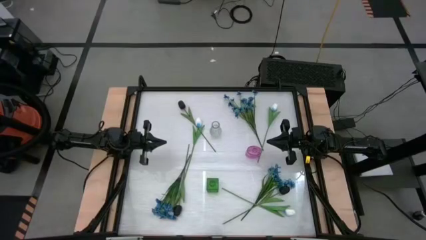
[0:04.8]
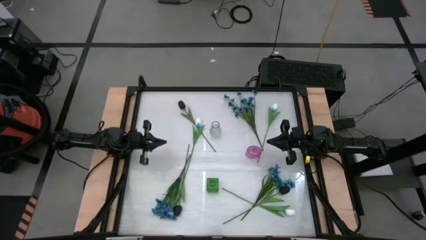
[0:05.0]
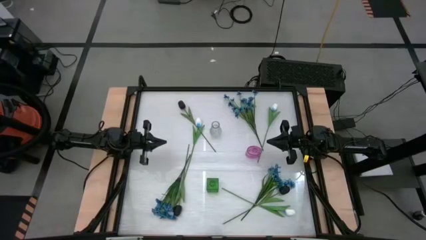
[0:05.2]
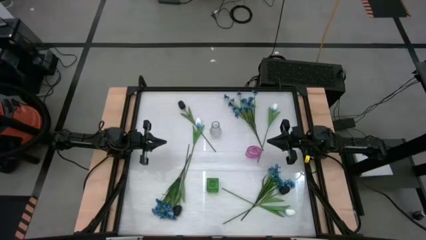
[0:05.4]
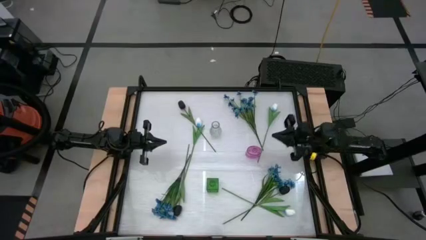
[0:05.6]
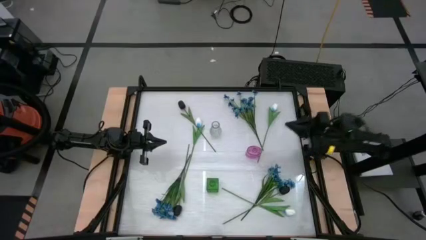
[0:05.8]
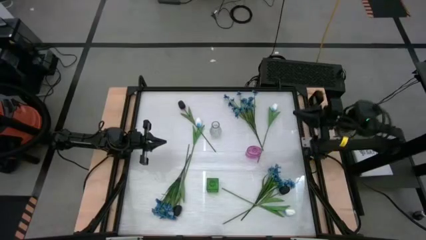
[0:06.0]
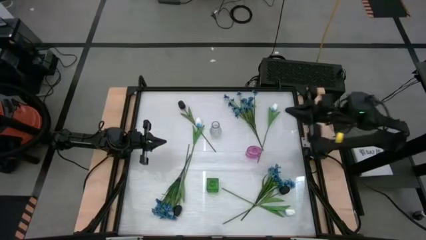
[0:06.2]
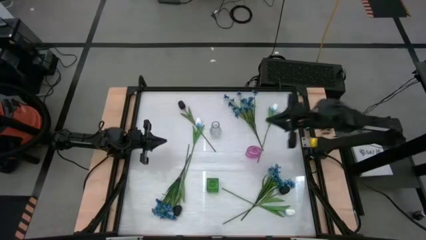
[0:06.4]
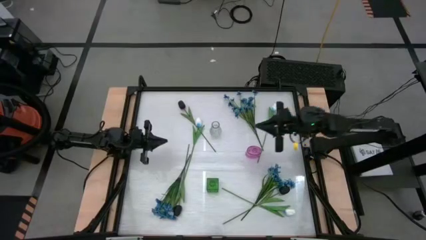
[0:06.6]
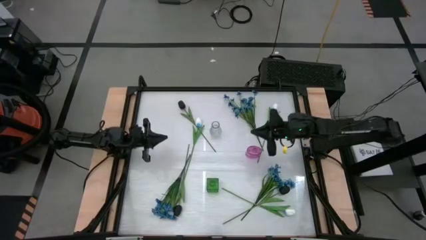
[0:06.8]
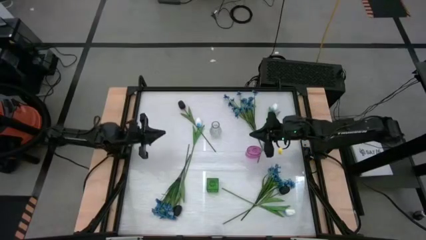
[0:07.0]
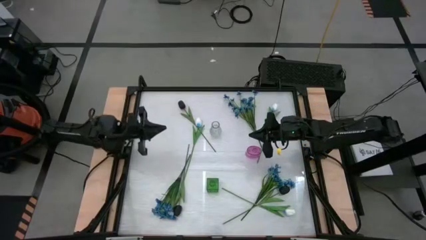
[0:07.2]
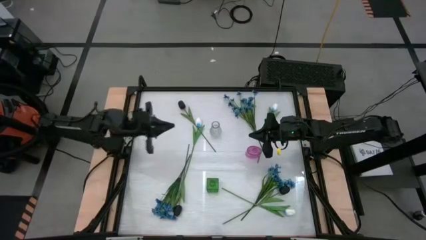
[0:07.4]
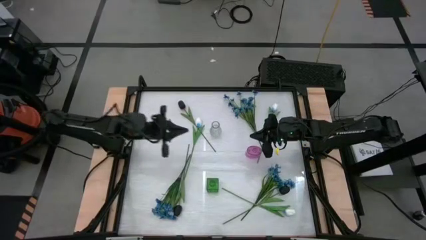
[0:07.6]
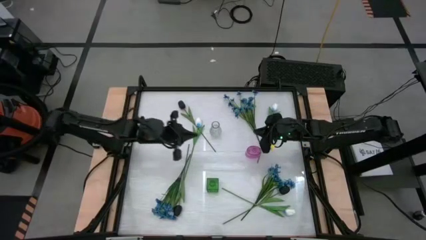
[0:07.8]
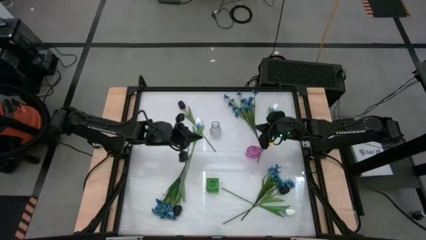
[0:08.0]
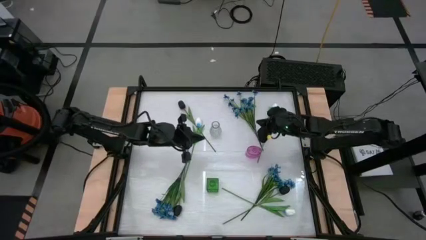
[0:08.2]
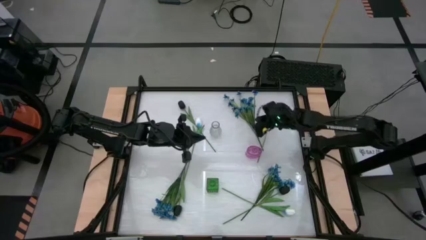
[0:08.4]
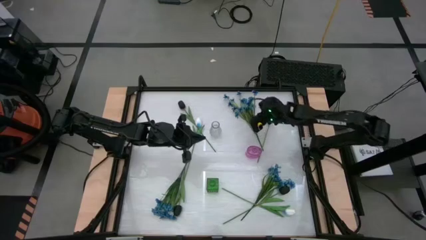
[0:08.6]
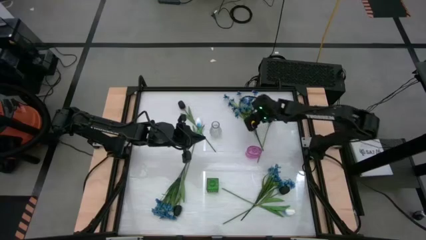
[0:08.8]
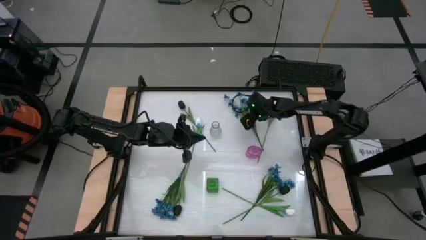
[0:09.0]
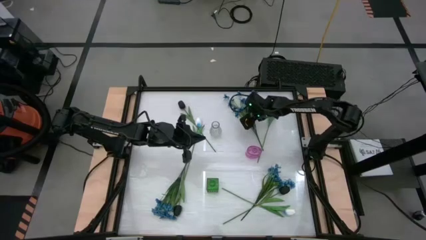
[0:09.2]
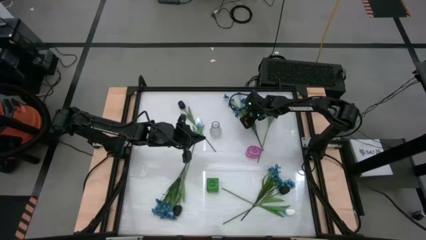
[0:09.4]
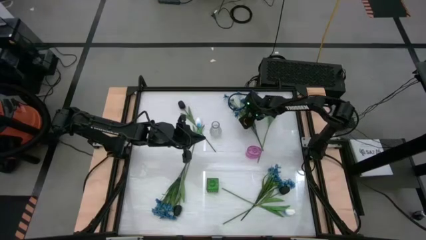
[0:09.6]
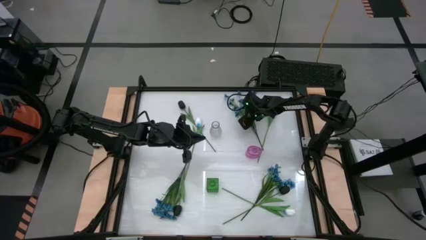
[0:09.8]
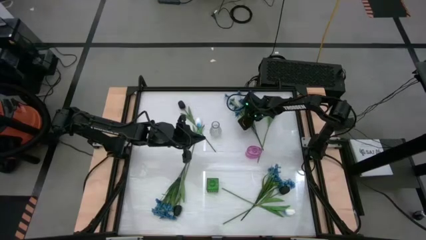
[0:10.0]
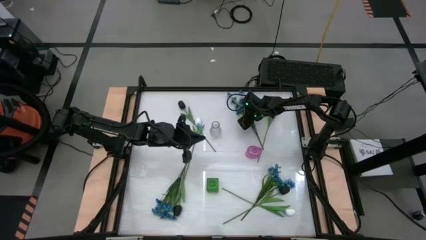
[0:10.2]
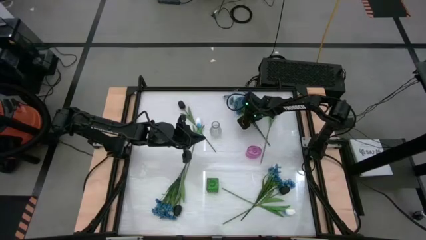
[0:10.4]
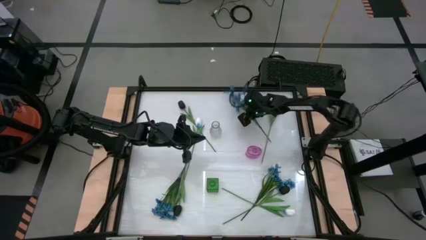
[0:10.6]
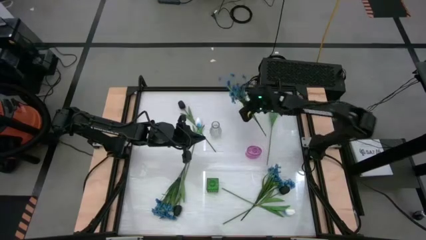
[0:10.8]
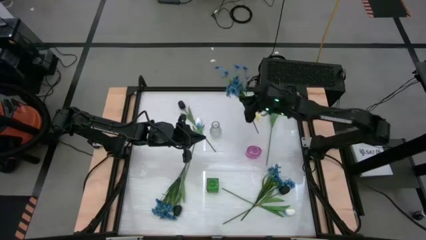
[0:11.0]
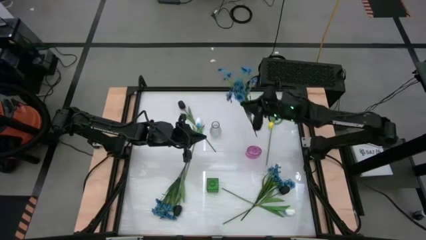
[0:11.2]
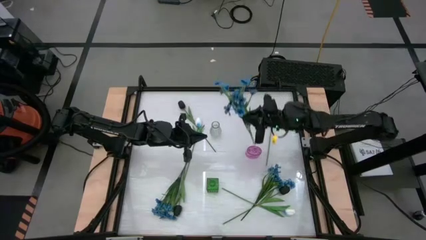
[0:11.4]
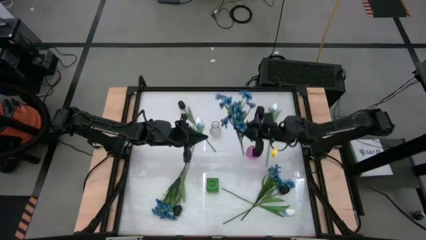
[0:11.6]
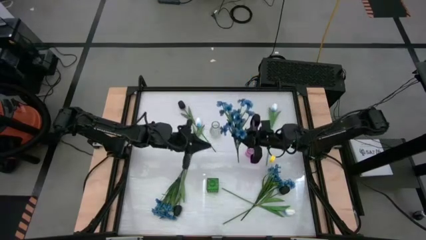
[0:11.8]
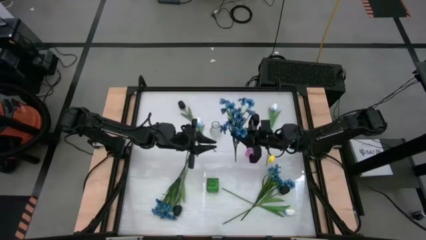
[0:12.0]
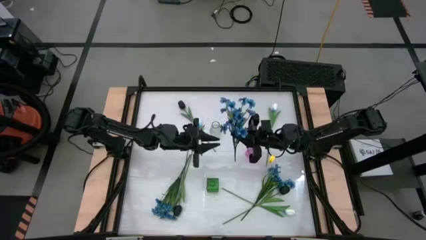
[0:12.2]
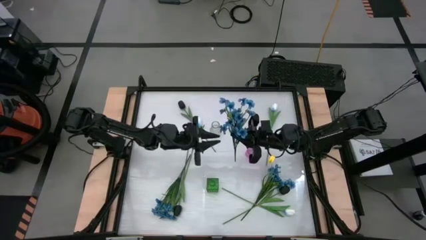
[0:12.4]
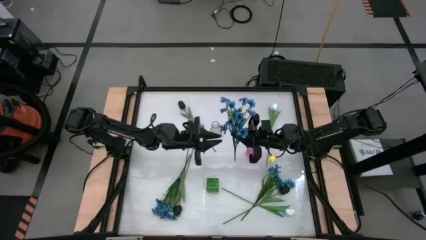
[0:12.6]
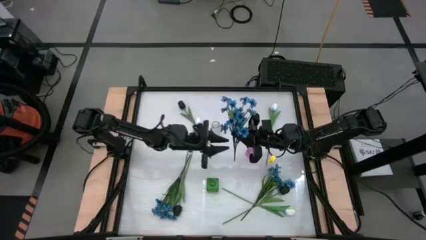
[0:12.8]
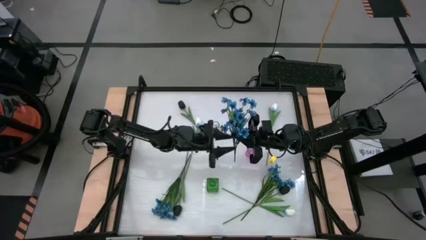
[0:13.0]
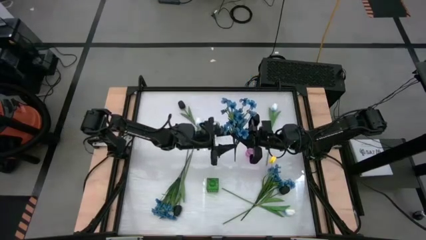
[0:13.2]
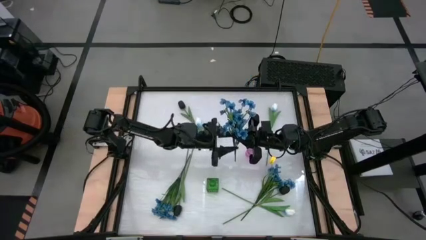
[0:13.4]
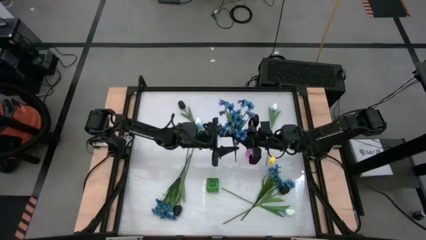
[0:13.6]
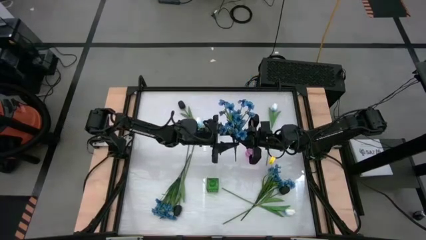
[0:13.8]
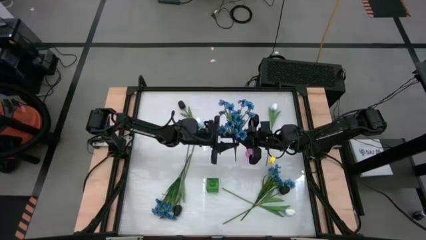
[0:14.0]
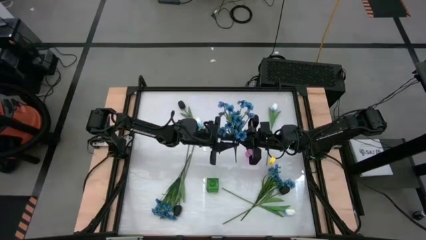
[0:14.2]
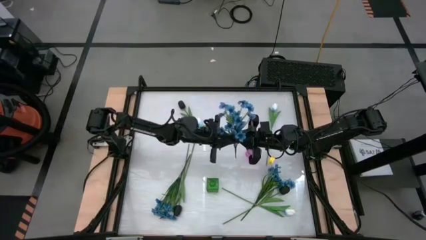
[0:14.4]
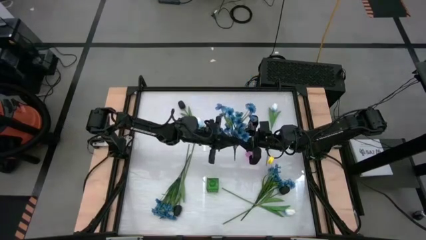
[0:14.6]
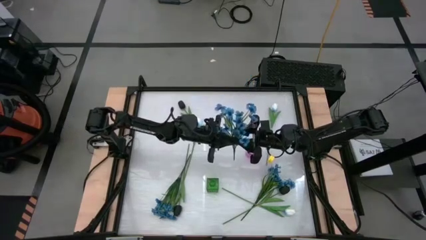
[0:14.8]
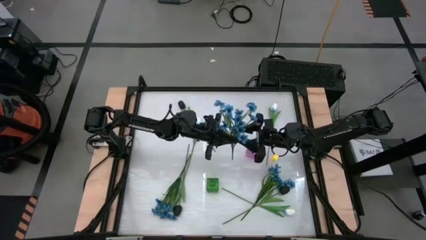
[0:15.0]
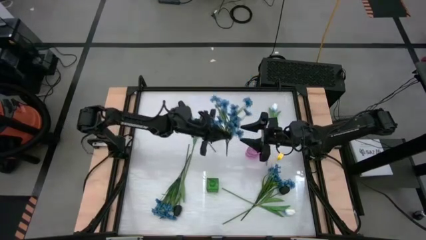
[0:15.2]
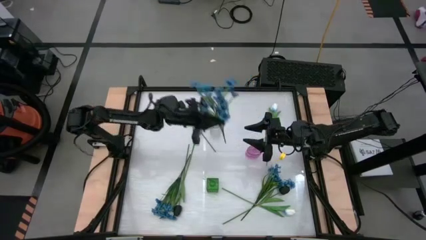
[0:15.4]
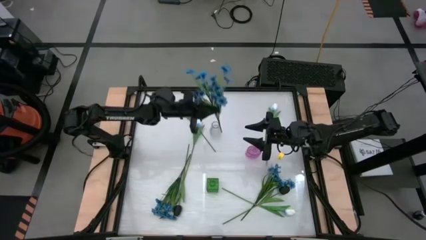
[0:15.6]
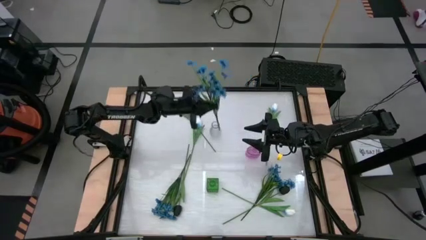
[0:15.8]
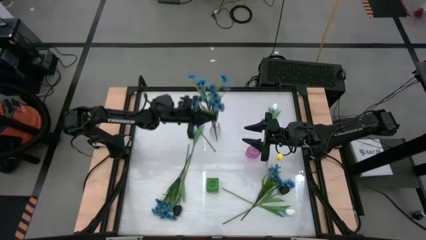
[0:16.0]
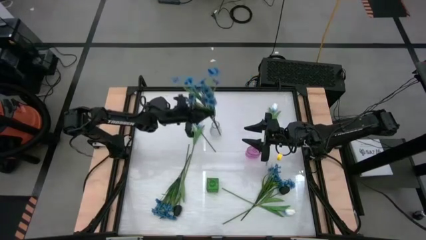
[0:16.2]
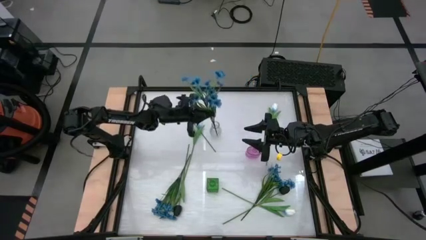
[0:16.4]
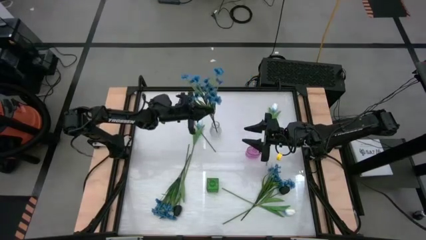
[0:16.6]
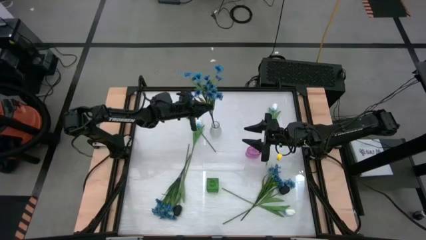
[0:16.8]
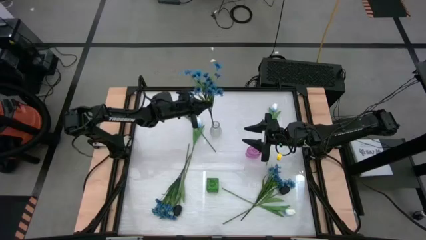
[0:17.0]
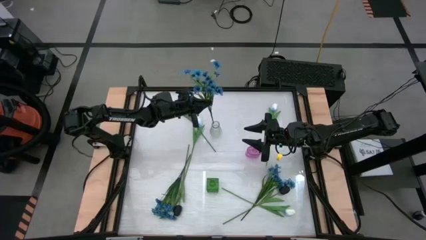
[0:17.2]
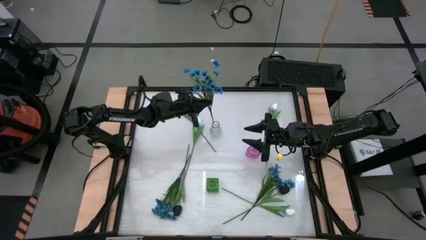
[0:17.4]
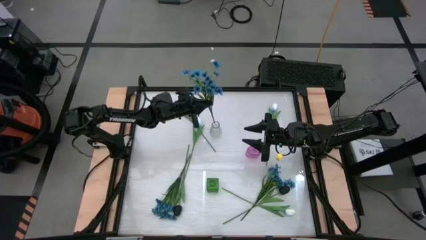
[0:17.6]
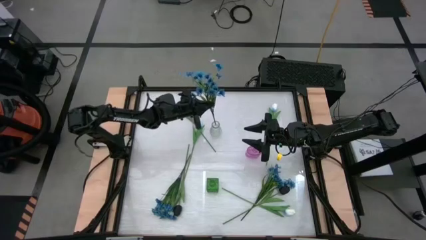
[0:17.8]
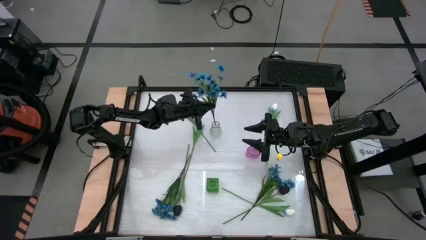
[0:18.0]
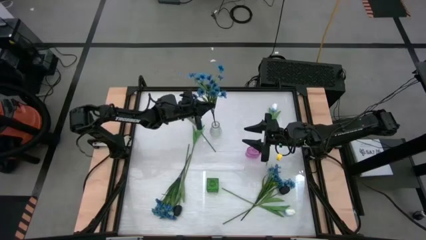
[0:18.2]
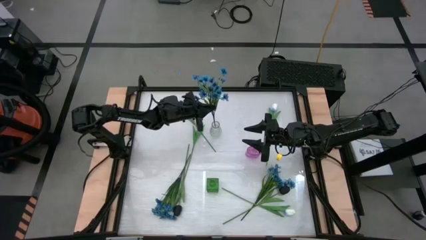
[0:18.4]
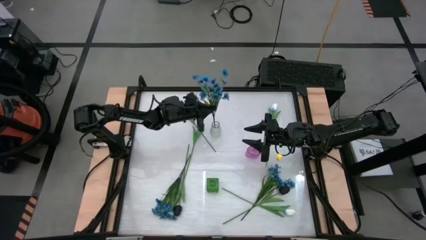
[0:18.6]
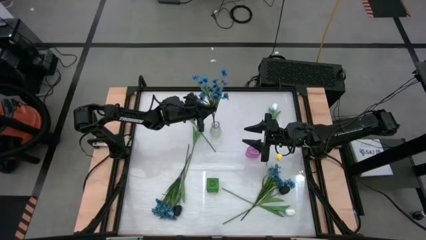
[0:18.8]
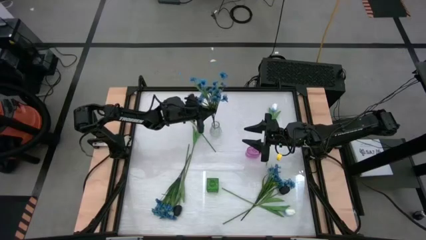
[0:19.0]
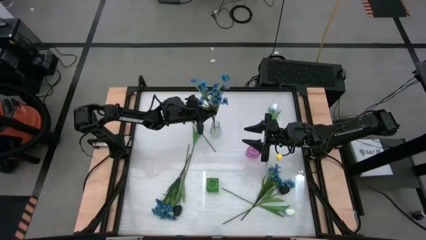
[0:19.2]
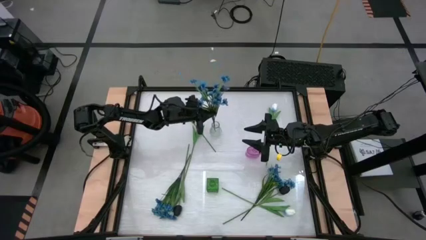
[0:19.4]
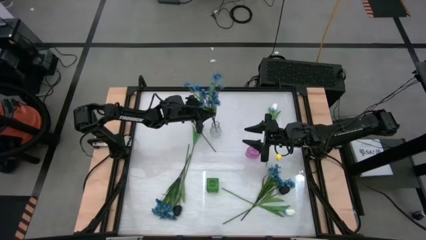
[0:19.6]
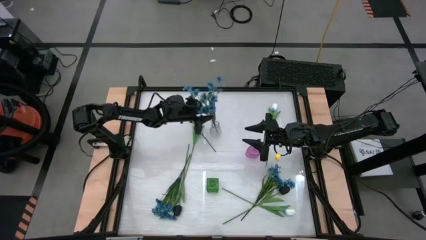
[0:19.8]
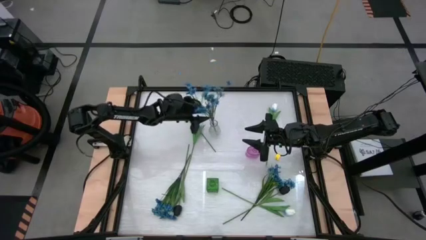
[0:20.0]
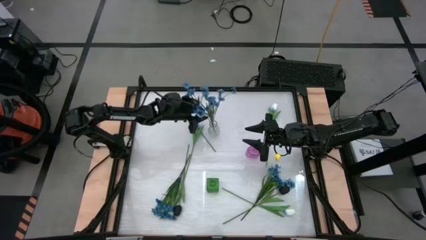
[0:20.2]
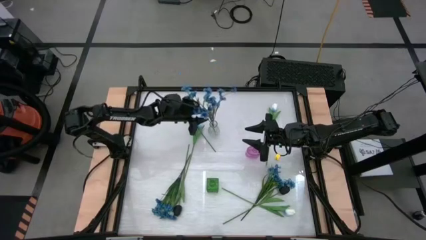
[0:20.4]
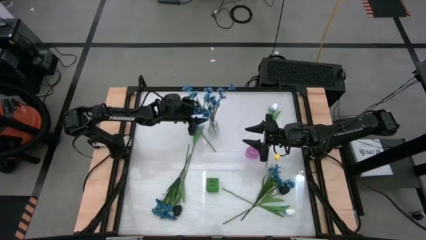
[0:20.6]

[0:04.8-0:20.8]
Task: Sort flowers into vase by color
Put the top blue flowers into the transparent vase
